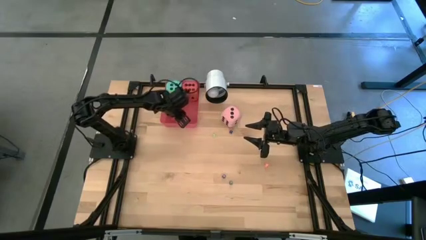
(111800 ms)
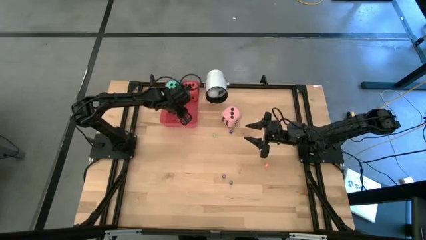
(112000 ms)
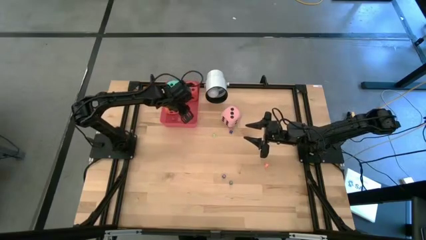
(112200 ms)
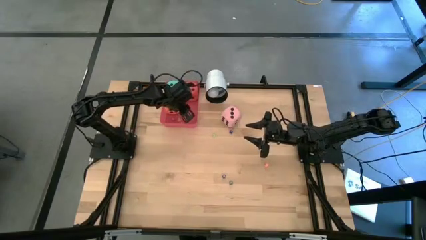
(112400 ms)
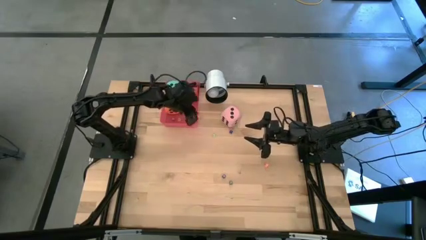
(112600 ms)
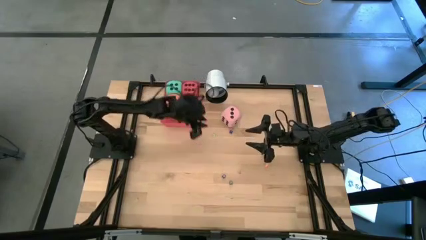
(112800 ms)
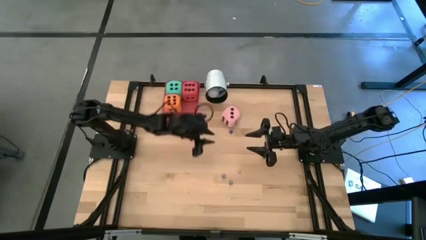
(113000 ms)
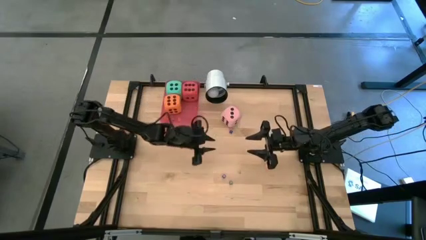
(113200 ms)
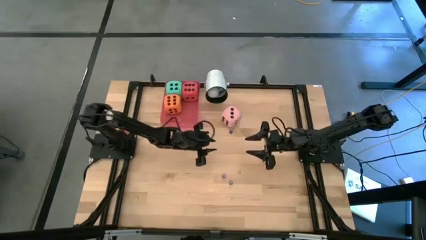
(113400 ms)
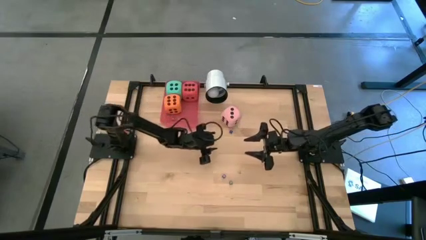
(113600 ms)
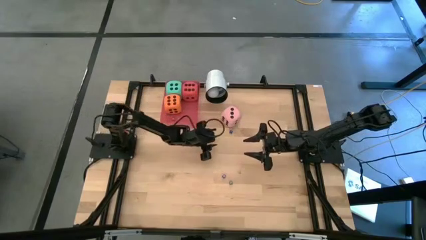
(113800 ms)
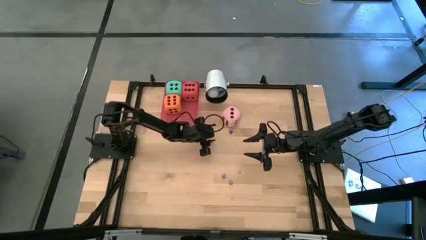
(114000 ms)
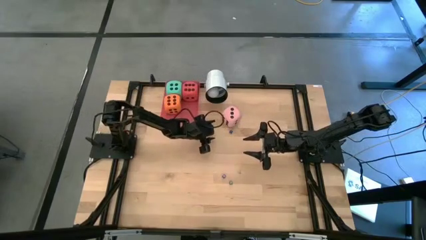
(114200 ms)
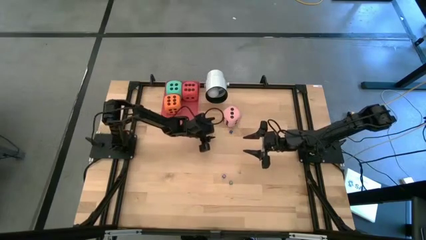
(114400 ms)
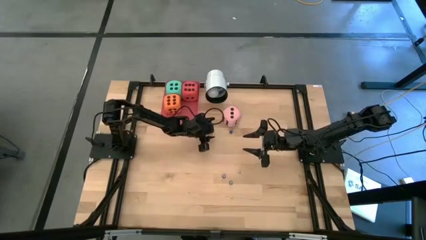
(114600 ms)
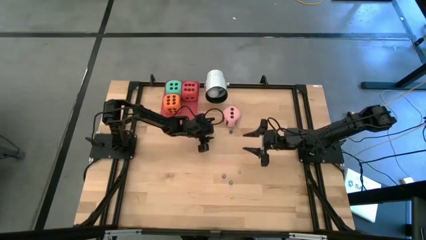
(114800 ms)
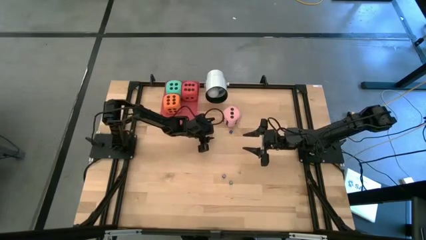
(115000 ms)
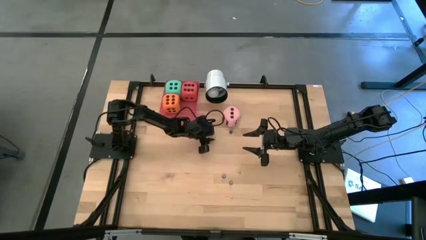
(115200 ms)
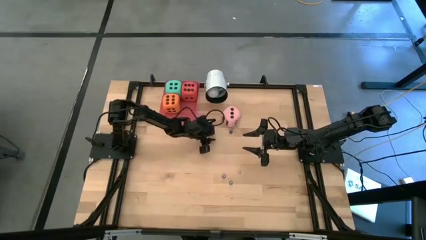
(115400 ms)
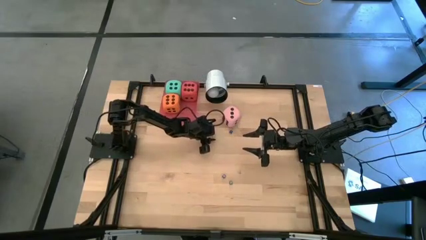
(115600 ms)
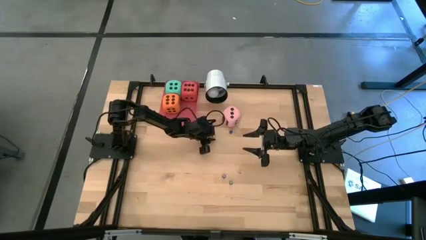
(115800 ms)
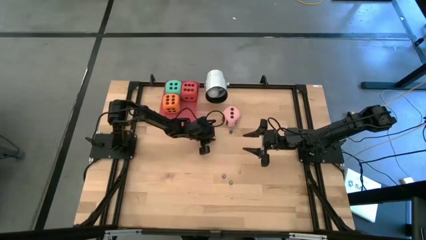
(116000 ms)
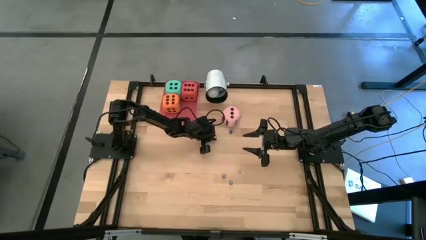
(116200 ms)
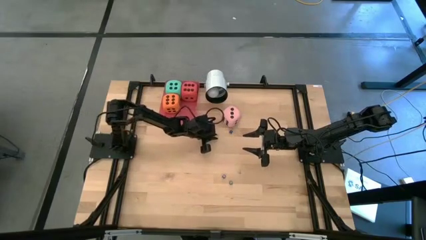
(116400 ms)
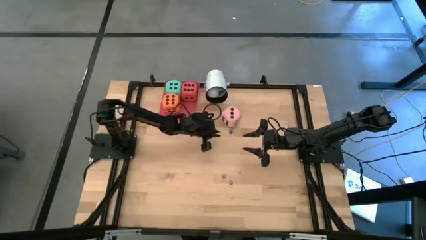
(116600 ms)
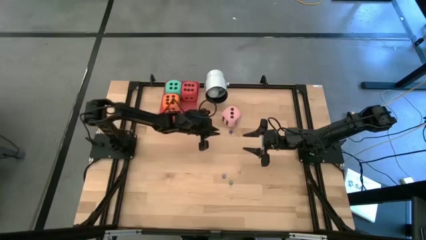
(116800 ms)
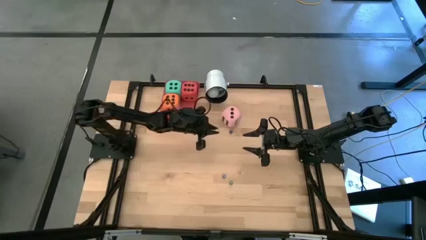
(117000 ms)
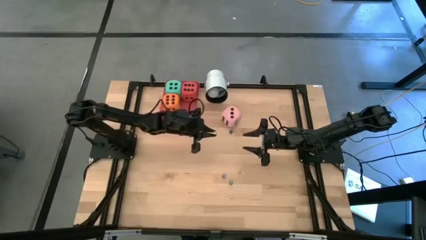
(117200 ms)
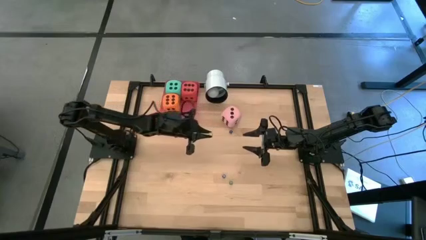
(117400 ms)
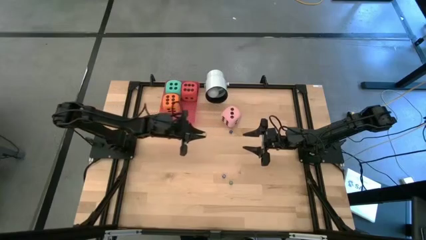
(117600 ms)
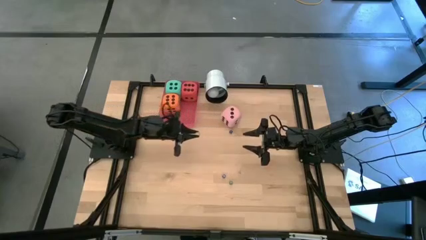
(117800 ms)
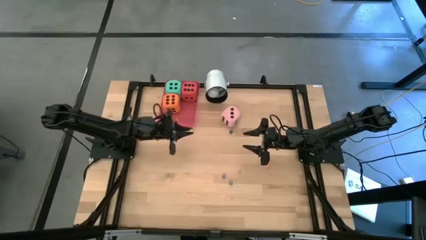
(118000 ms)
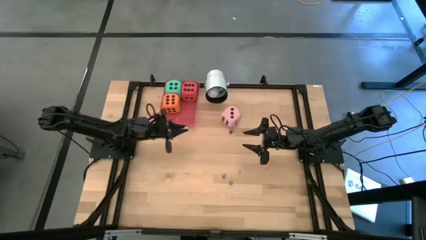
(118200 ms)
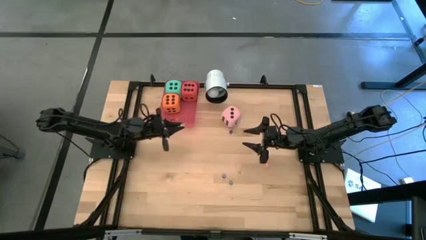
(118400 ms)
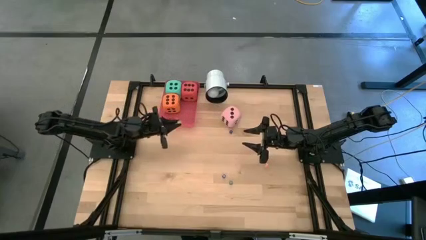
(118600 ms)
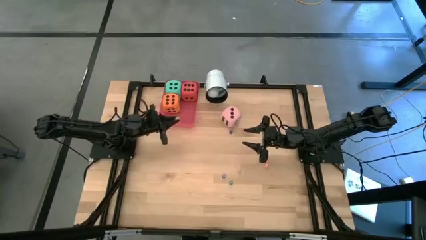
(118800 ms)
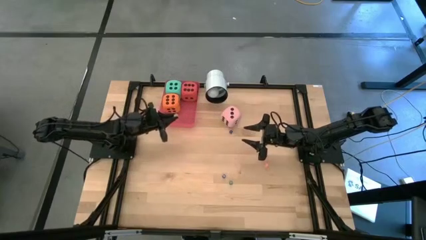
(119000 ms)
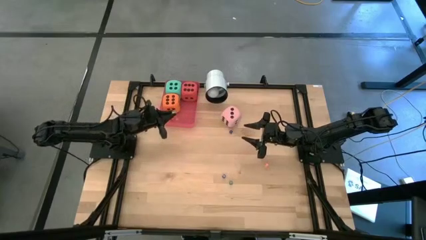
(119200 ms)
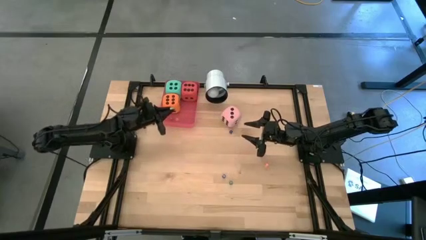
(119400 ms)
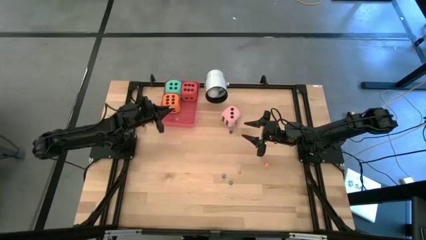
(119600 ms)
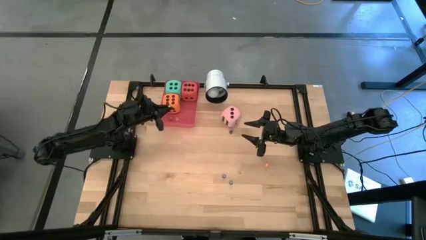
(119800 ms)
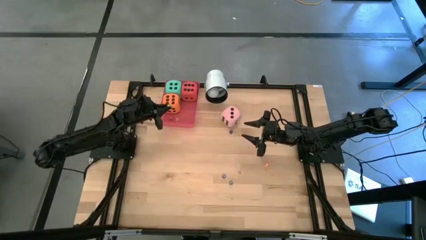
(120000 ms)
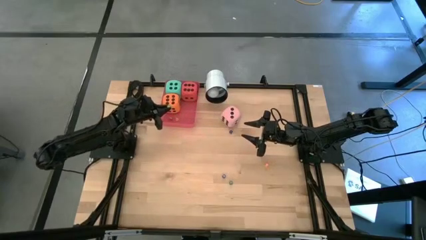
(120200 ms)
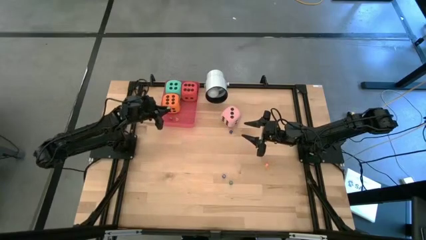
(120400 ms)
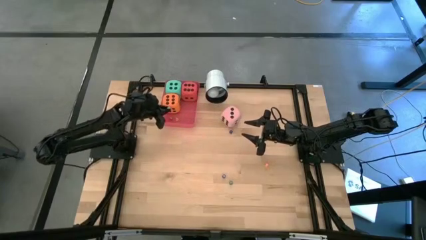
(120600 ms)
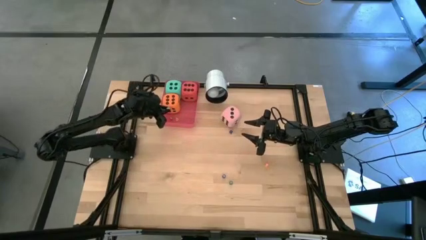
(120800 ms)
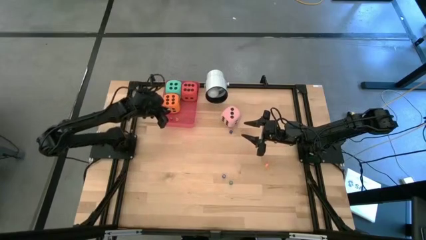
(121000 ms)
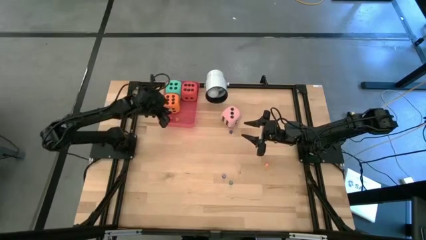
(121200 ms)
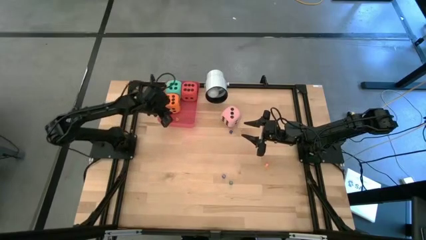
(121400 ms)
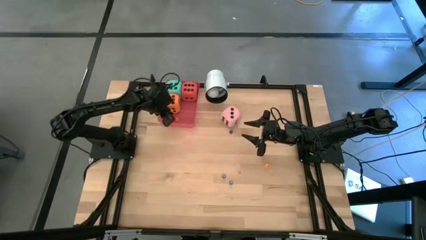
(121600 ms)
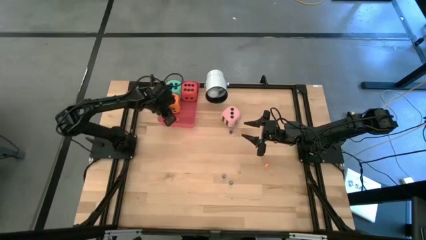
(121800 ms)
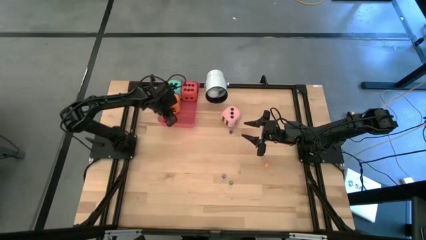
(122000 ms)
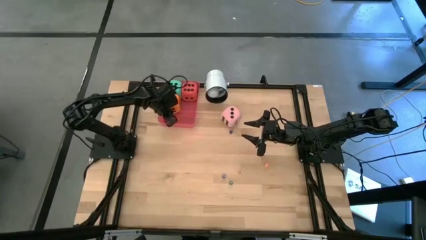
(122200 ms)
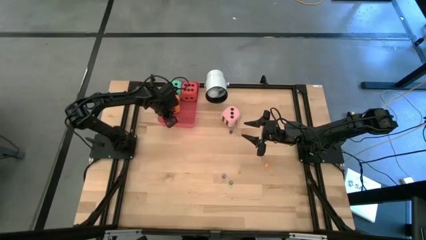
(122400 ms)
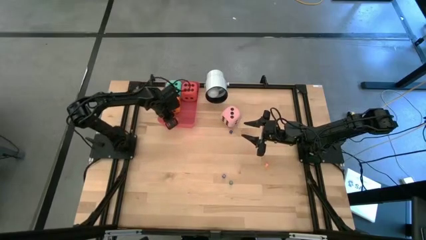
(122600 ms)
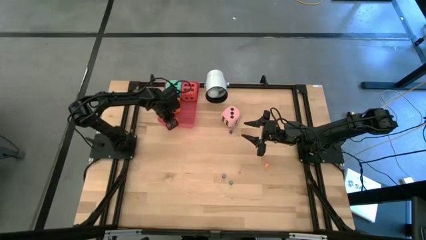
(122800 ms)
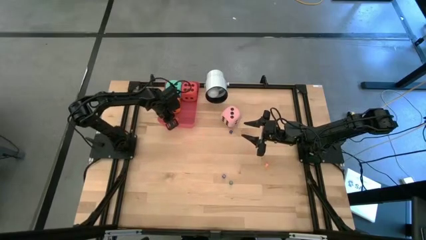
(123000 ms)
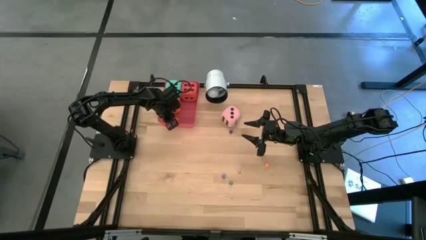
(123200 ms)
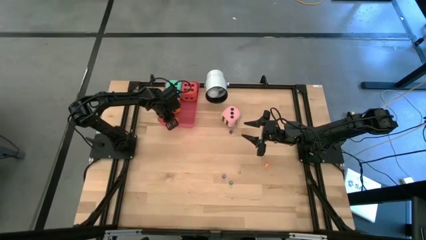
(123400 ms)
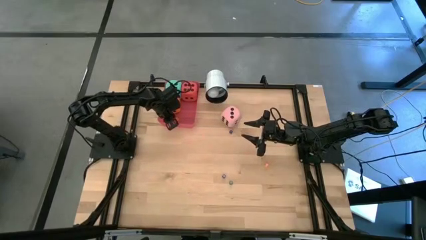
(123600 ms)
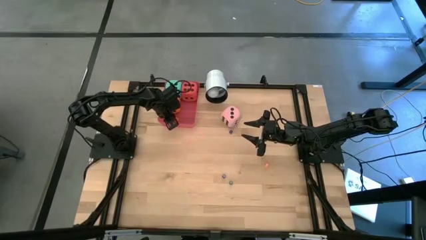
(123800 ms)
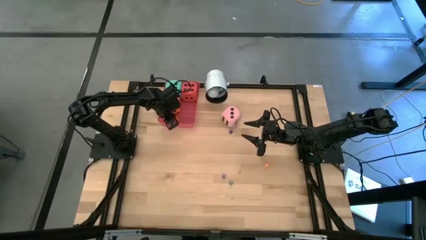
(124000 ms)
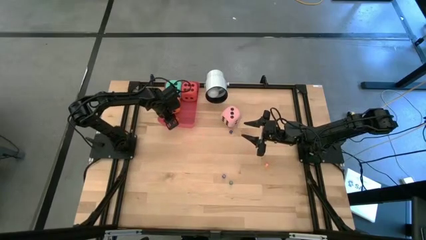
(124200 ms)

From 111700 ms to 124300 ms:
Task: Pick & Place Dice
Put the small light green dice into the red bin

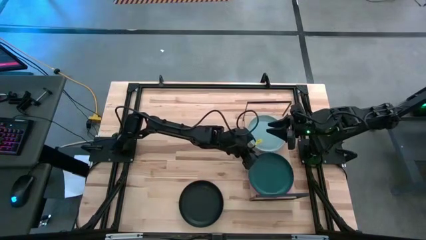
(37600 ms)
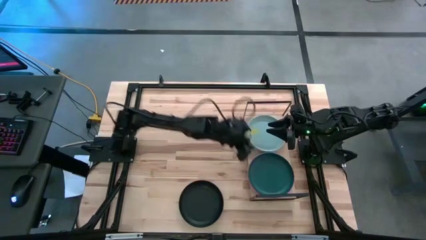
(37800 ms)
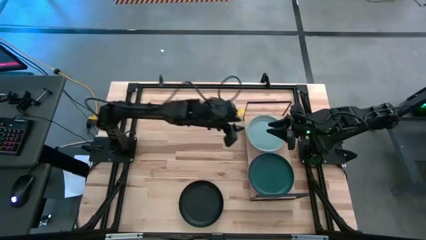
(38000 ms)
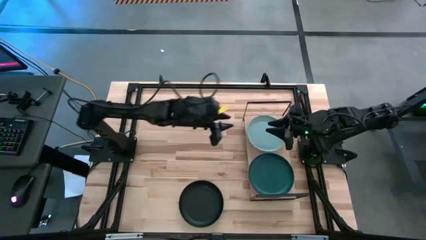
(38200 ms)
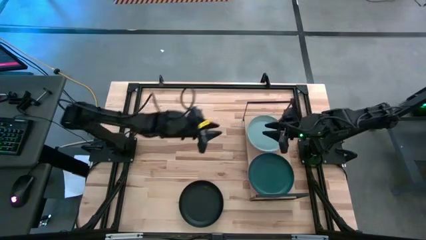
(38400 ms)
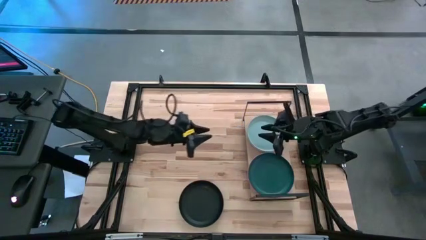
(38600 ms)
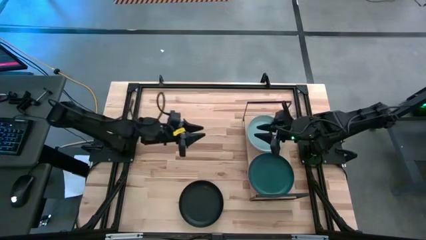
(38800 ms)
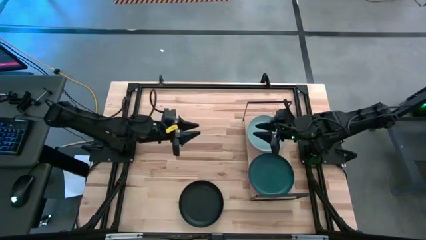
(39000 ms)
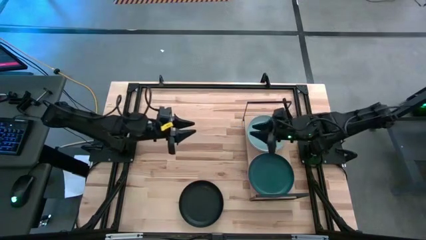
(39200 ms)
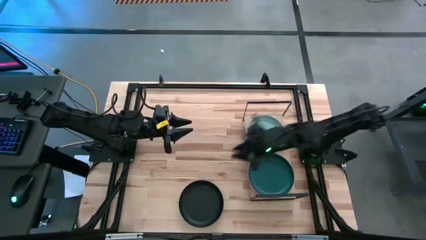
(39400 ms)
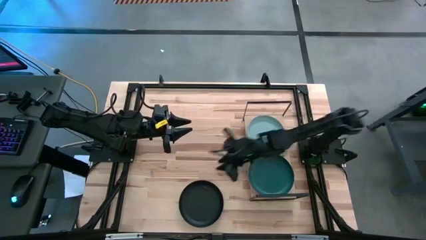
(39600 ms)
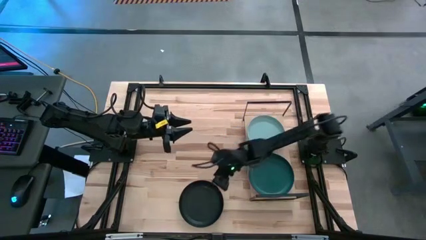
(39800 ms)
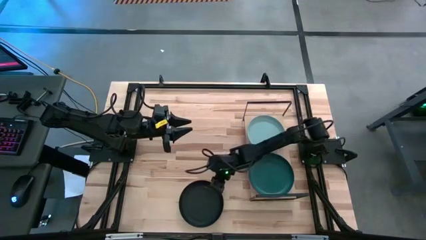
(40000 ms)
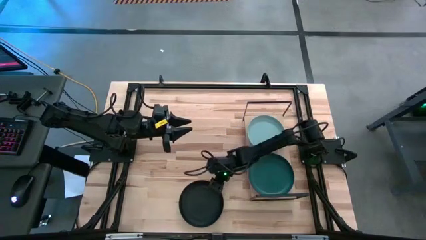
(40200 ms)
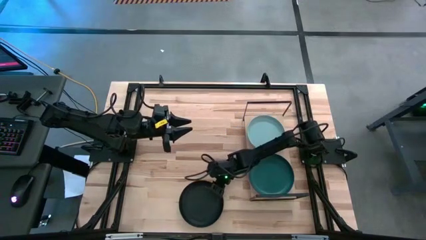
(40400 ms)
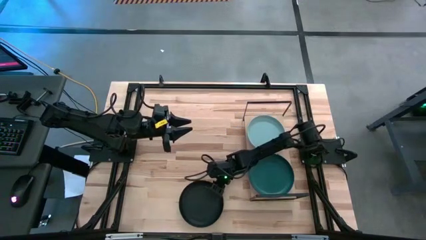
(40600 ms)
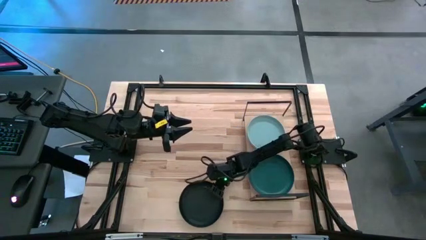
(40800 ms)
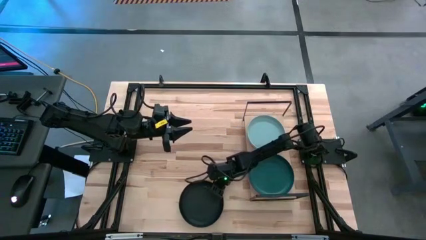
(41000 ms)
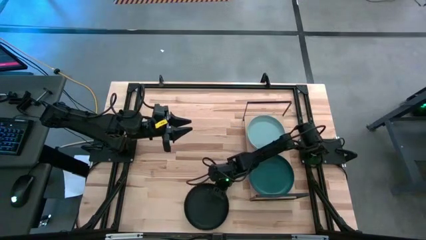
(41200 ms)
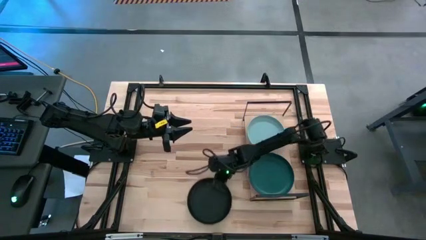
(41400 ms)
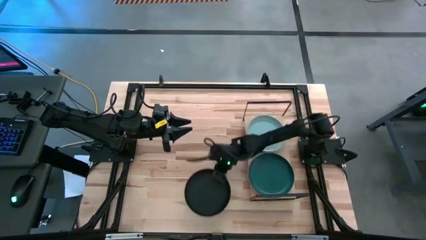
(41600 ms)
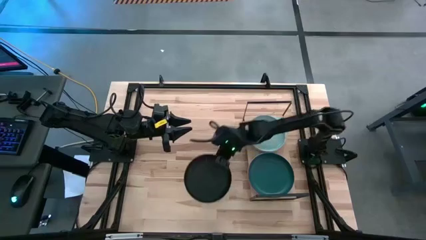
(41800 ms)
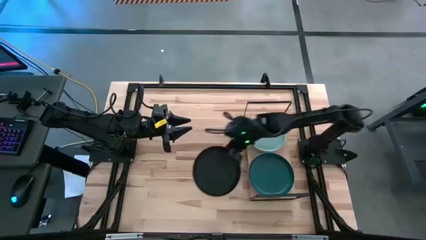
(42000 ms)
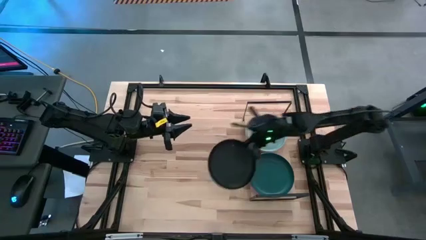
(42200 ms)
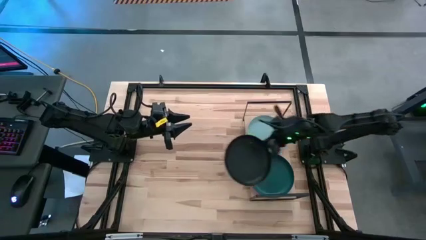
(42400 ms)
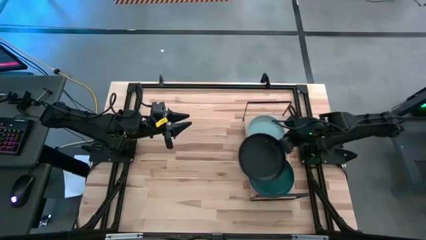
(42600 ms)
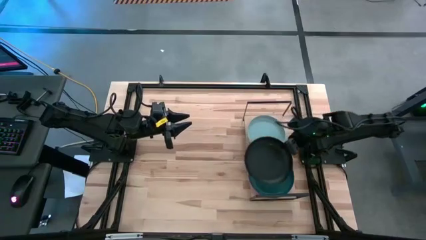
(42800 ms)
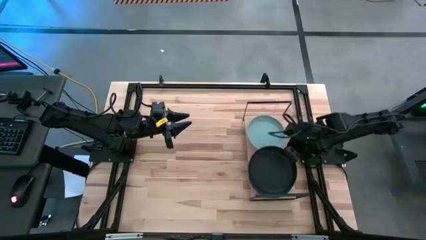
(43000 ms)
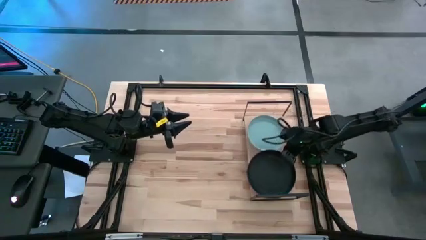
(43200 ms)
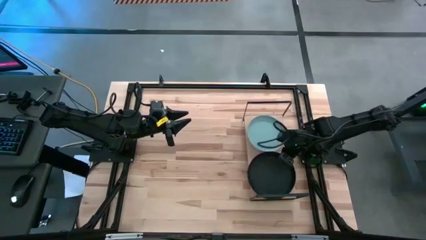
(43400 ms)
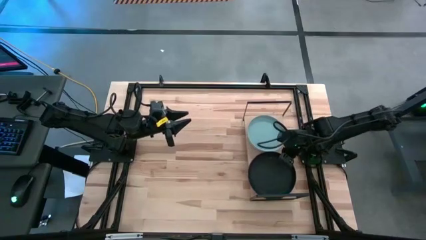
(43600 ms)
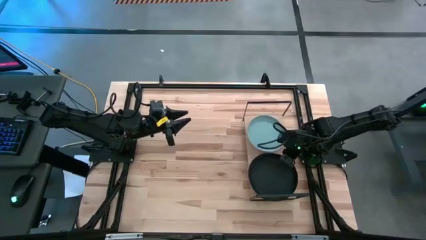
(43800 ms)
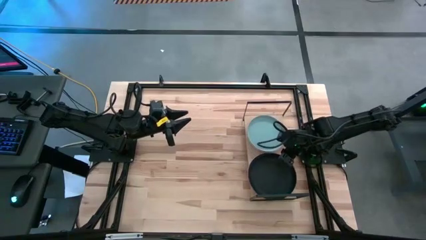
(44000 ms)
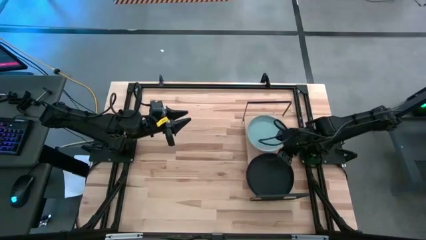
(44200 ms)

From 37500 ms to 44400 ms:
Task: Place and stack plates onto a shelf
Stack the black plate on top of the dark green plate on the shelf
